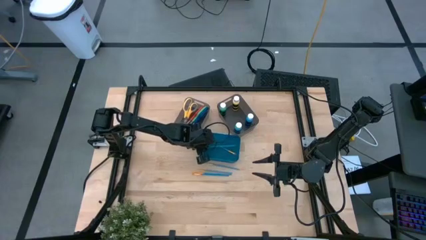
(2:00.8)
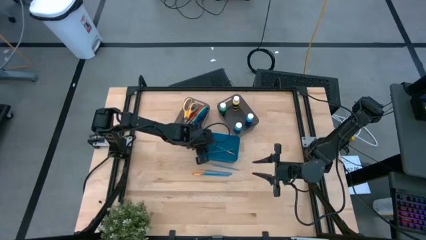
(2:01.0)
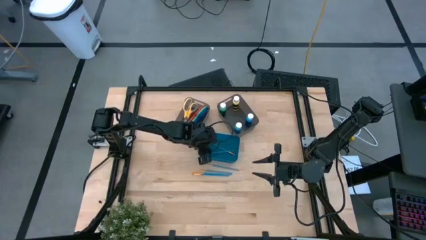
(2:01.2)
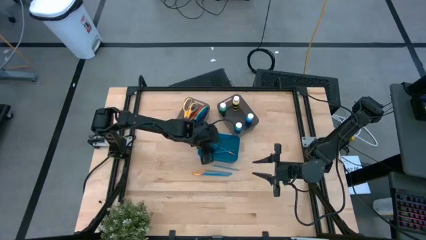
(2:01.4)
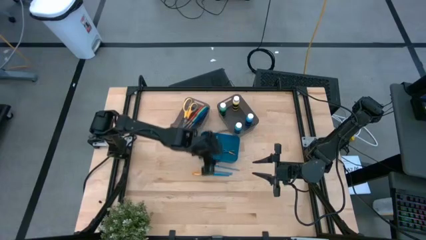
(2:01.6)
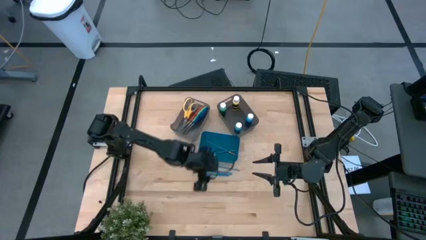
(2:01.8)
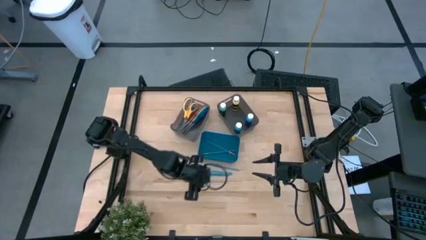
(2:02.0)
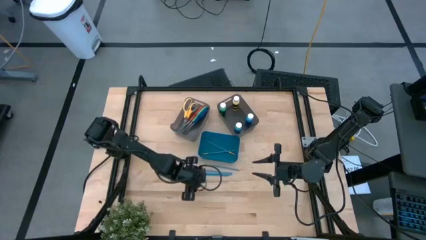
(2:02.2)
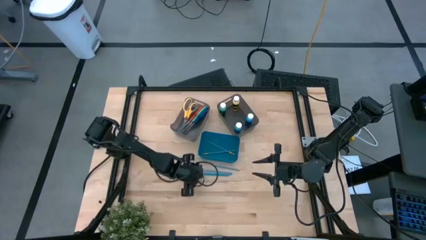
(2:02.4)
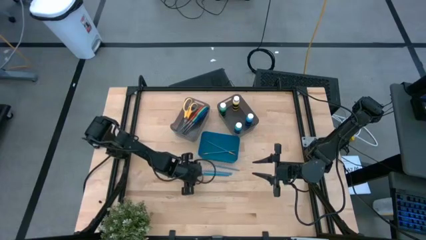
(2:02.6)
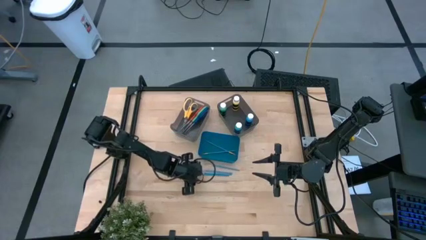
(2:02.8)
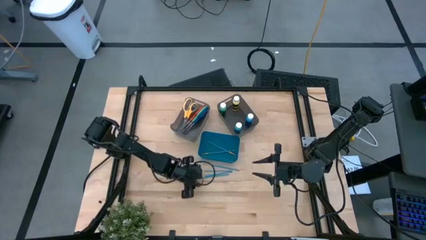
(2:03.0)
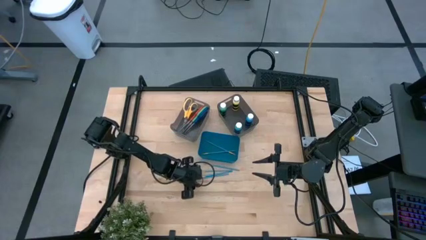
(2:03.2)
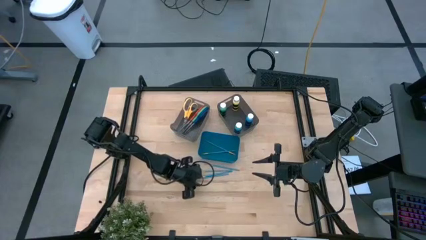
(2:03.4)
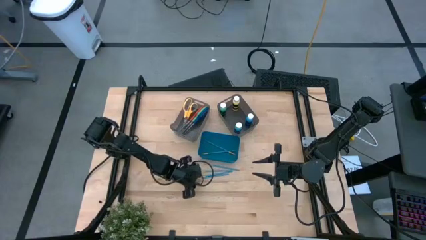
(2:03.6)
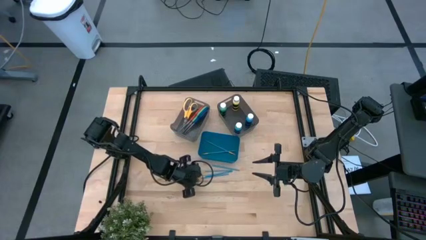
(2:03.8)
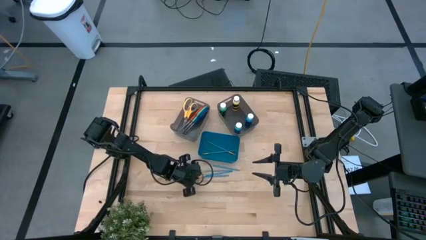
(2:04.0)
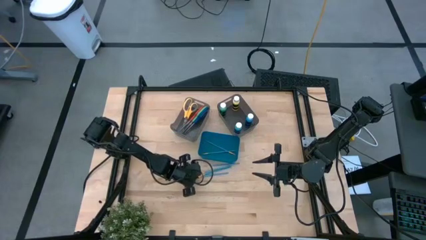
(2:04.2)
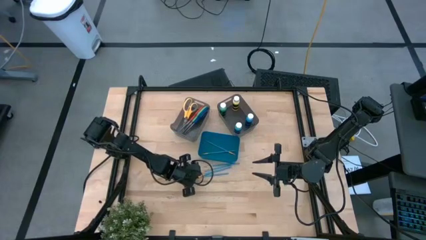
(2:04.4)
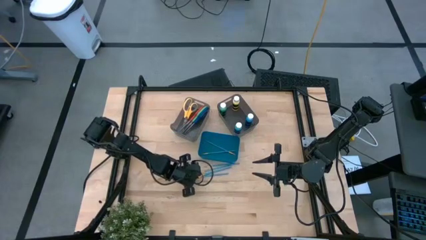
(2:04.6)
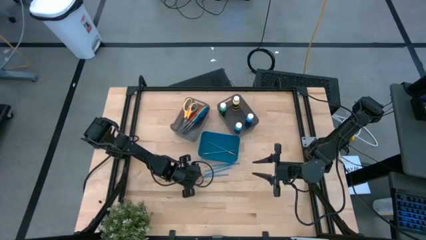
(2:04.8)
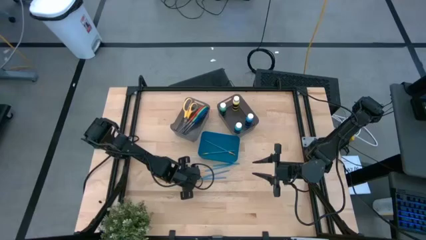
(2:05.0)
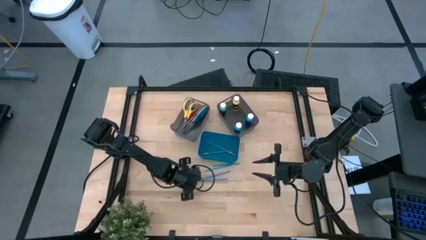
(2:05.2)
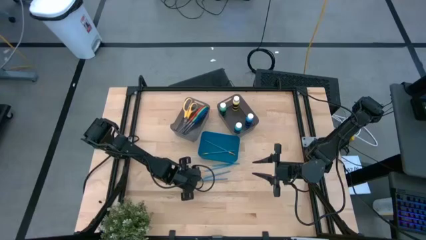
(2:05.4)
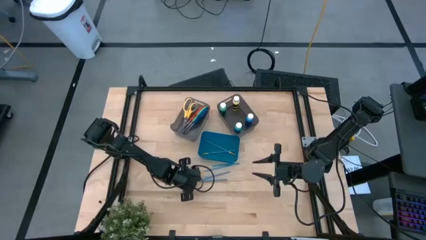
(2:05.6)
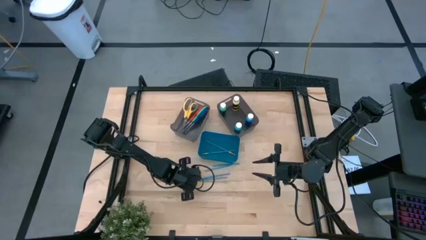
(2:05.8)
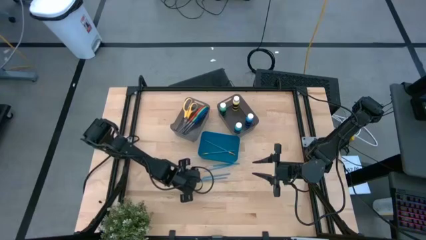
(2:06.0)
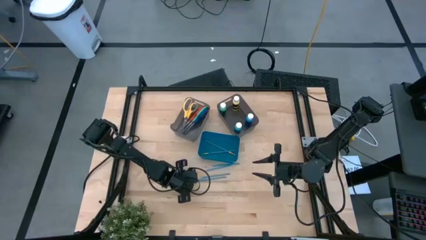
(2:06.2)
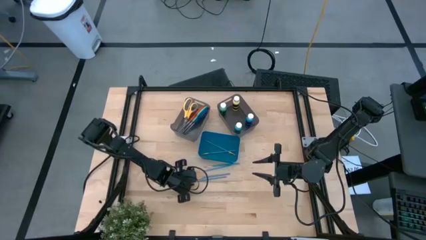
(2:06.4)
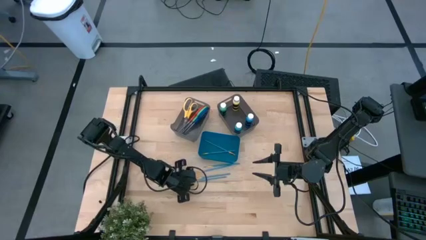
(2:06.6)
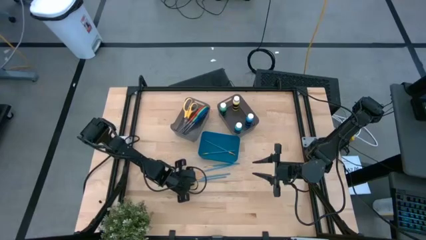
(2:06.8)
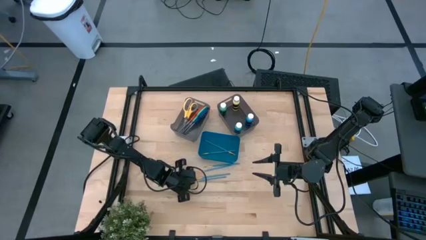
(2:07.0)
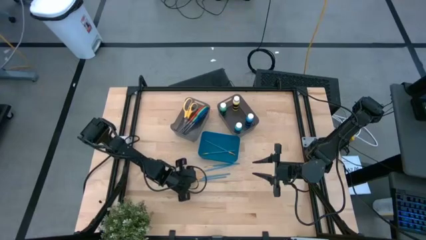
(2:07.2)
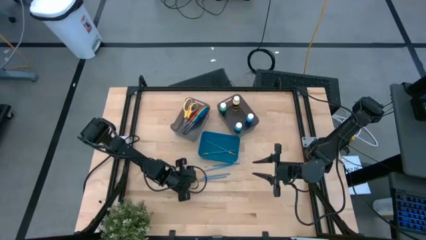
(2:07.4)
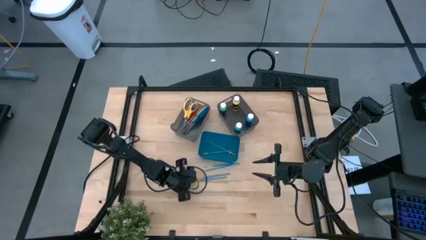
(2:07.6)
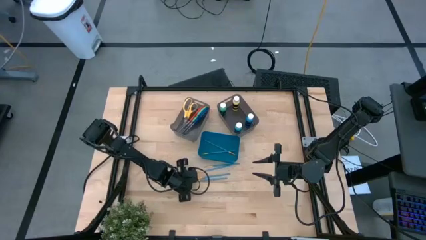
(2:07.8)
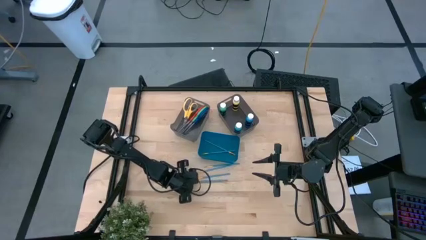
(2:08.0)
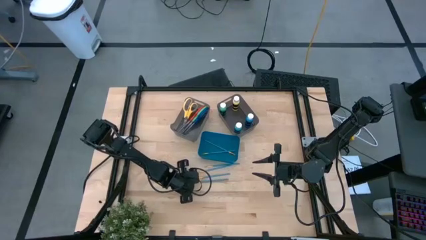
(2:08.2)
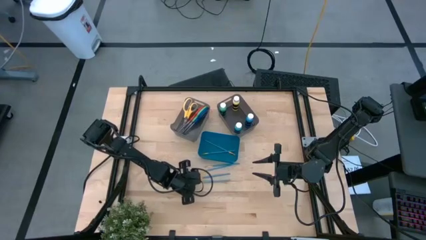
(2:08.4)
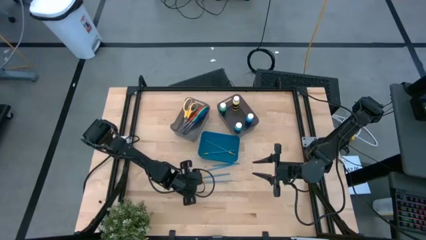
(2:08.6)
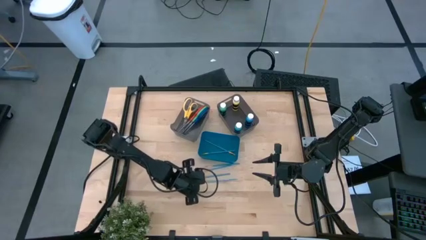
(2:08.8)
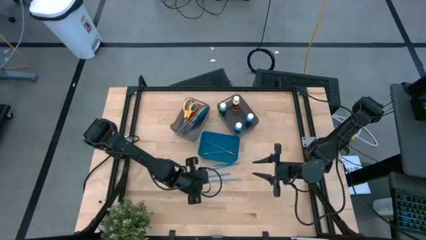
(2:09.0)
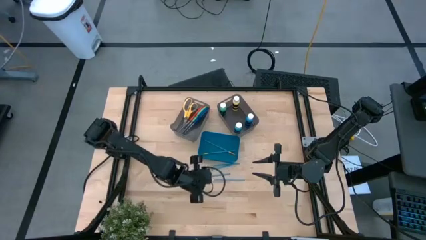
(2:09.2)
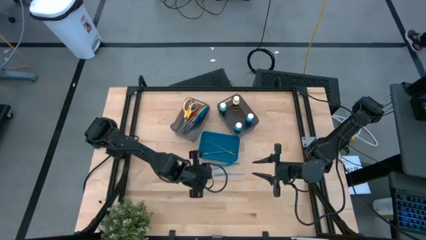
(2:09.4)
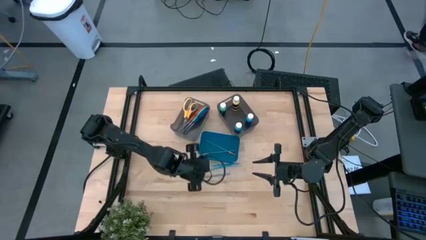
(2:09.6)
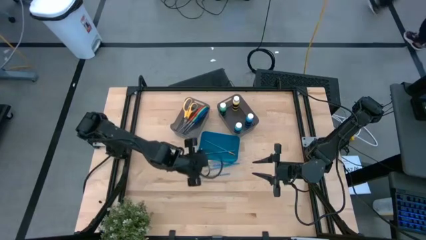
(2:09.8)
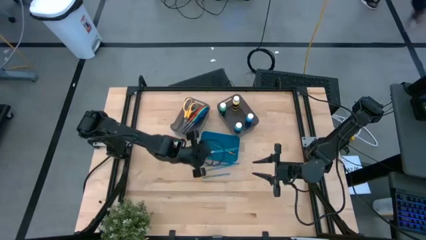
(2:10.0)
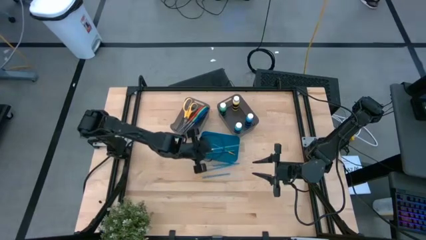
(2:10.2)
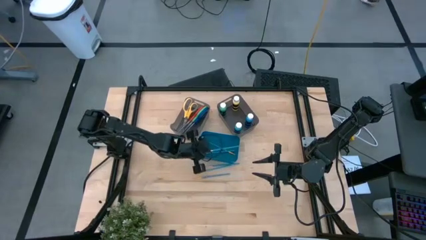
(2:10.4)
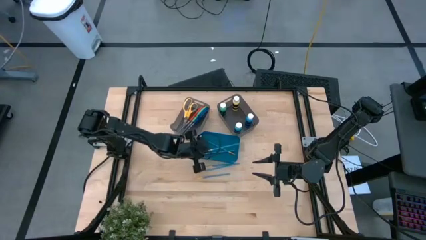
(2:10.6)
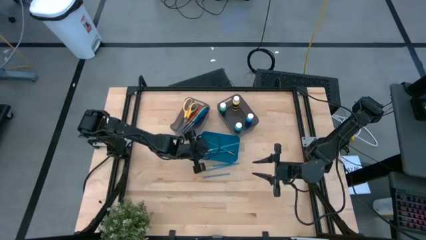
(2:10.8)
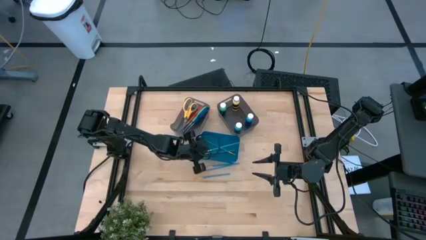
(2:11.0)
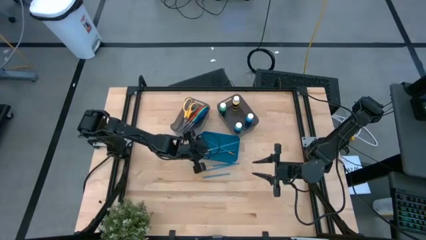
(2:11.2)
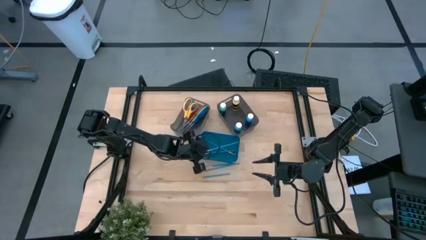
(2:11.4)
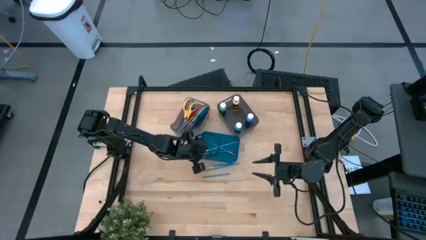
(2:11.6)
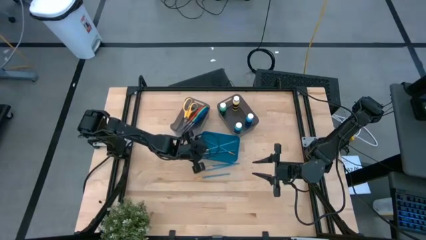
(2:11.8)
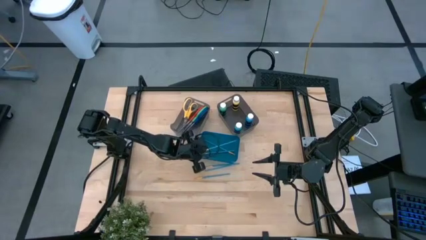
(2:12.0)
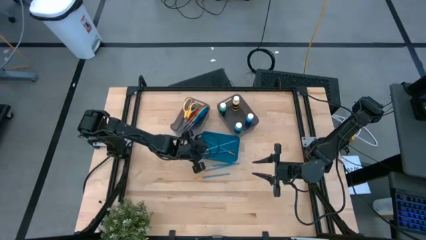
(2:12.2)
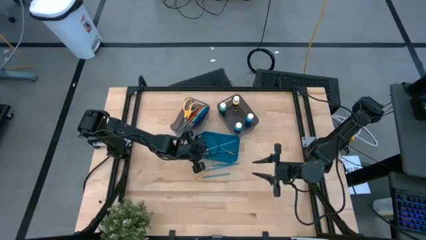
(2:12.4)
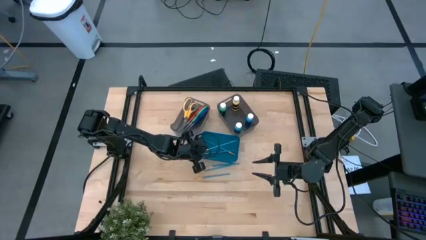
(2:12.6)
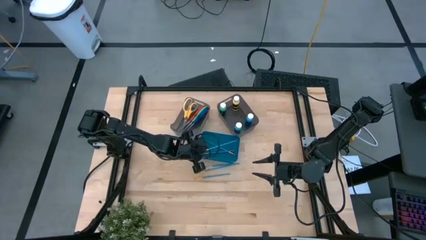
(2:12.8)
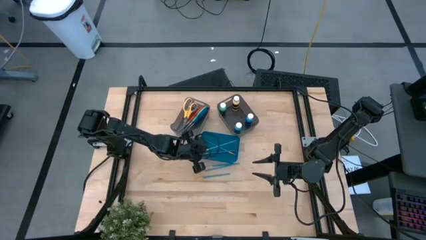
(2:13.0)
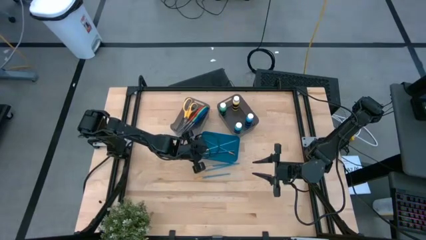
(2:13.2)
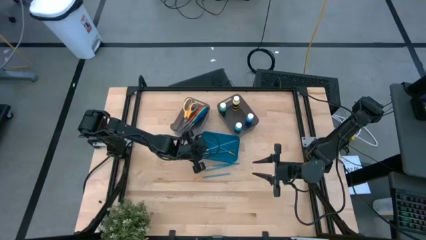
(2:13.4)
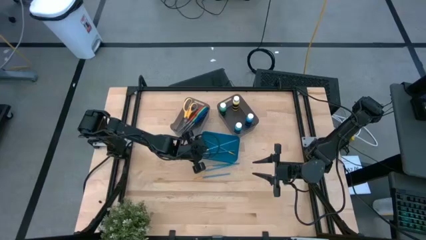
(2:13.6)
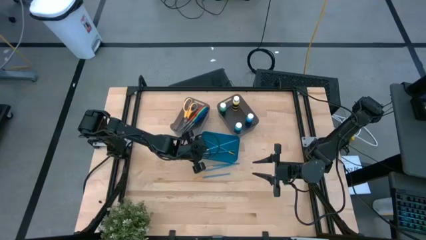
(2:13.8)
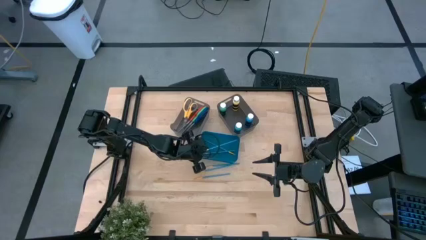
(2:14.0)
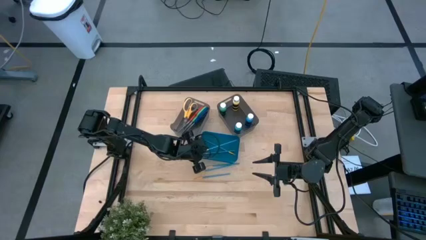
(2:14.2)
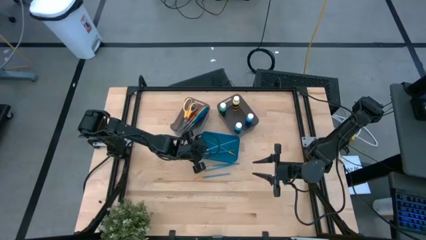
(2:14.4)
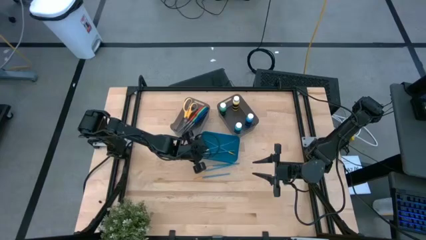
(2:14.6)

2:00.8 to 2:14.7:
Task: Pick & Place Paint Supplies
Put the blue paint brush into the blue bin
